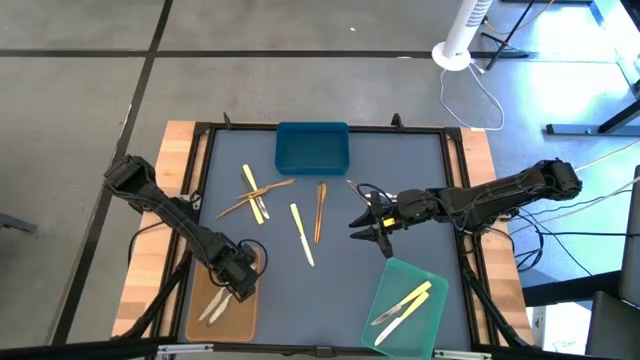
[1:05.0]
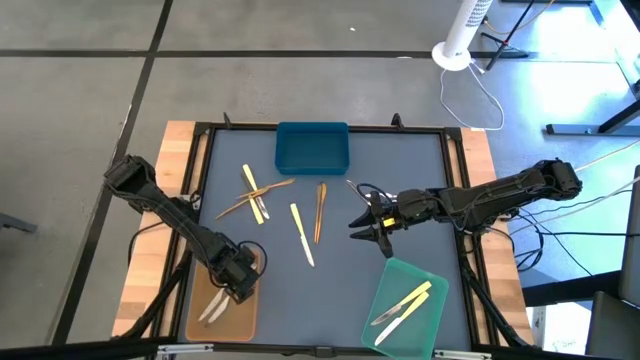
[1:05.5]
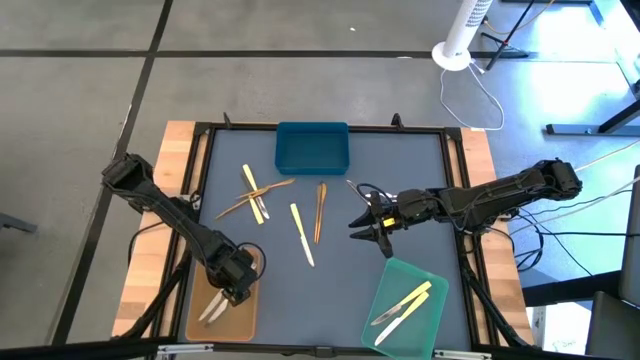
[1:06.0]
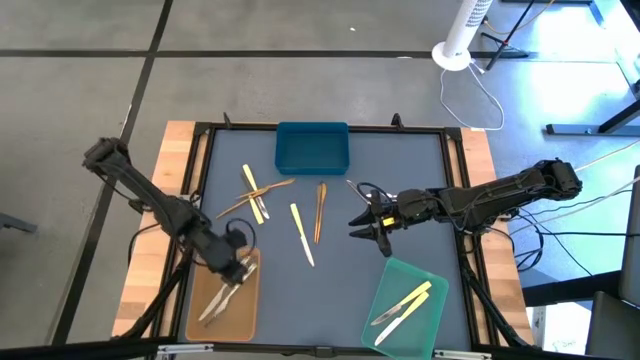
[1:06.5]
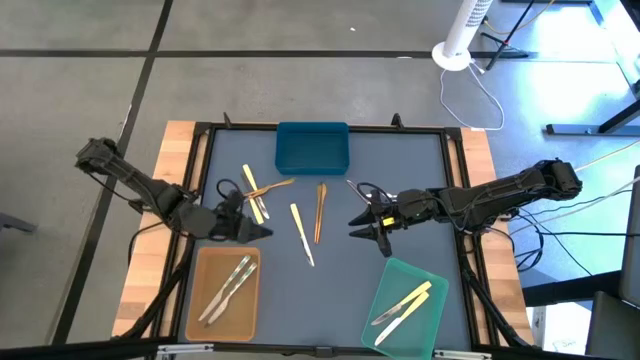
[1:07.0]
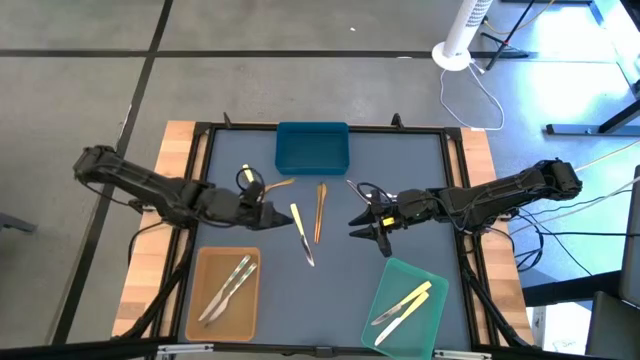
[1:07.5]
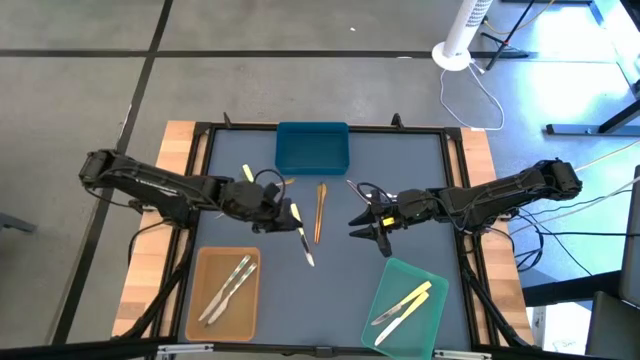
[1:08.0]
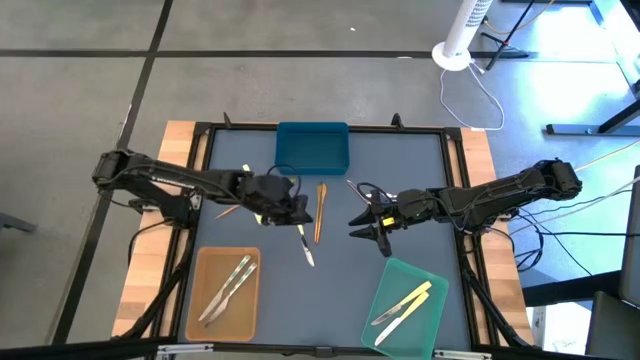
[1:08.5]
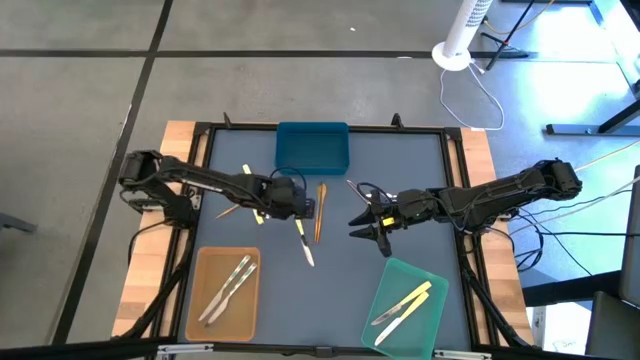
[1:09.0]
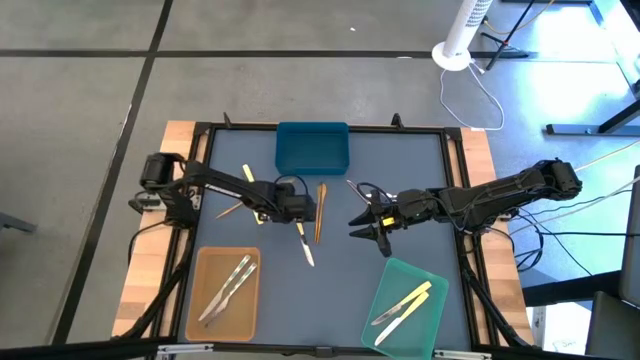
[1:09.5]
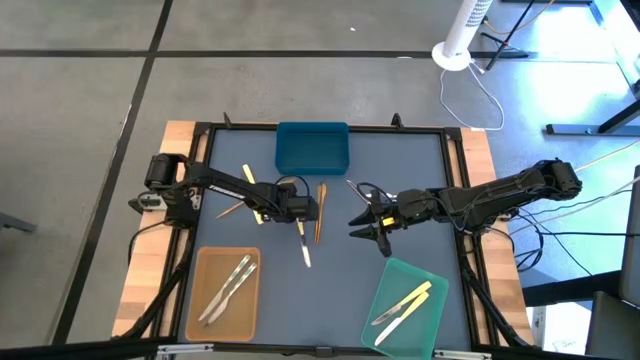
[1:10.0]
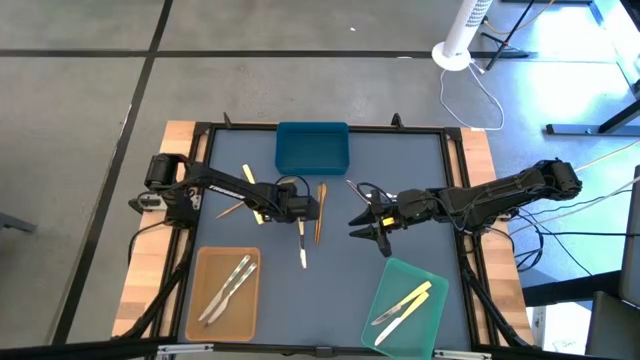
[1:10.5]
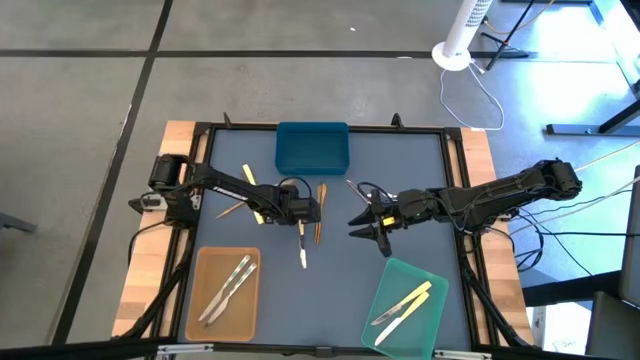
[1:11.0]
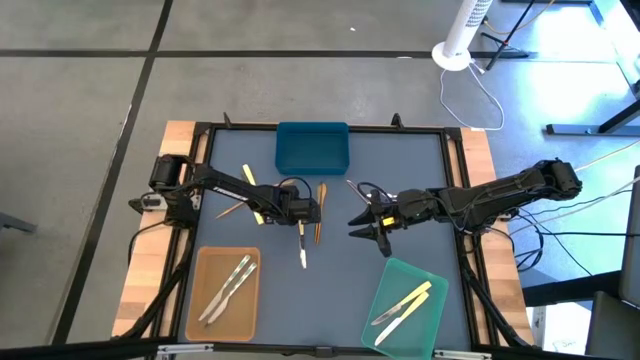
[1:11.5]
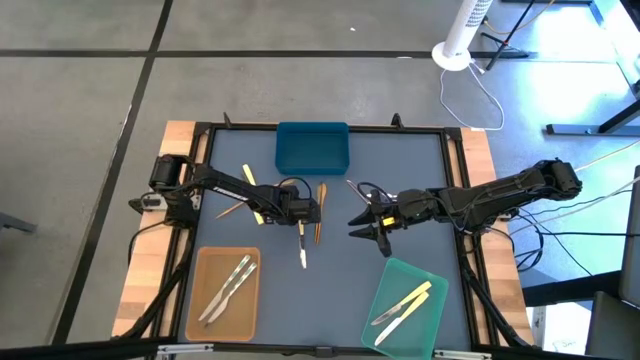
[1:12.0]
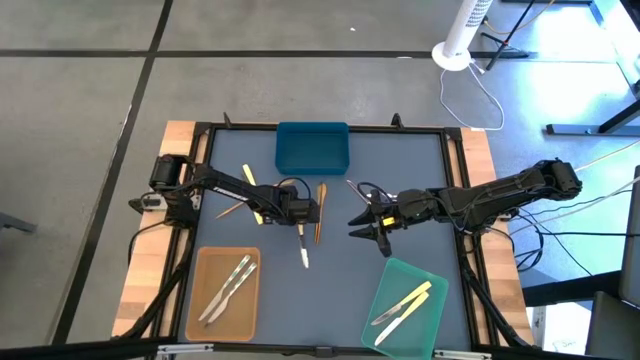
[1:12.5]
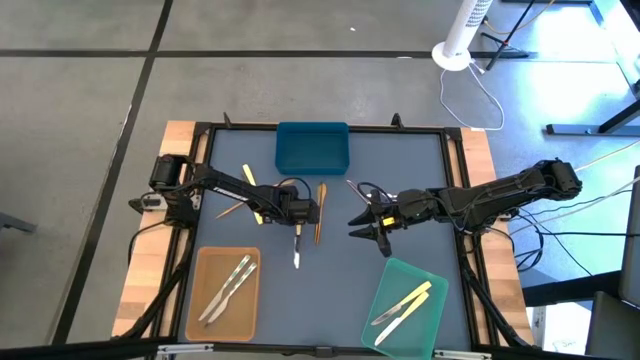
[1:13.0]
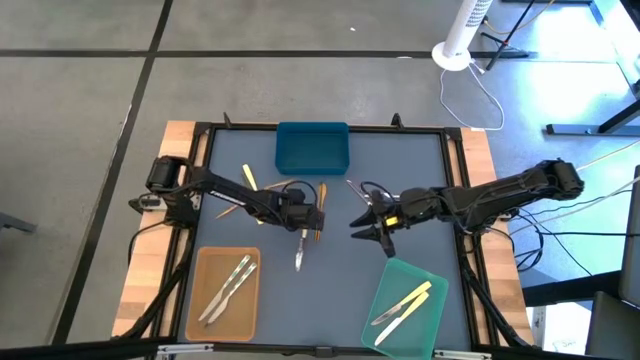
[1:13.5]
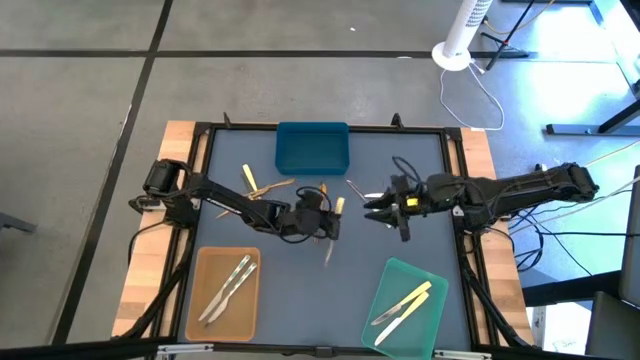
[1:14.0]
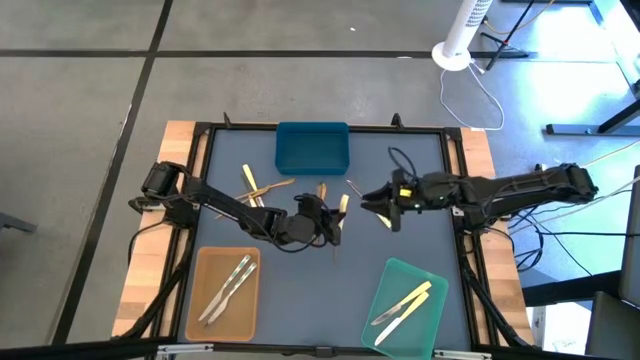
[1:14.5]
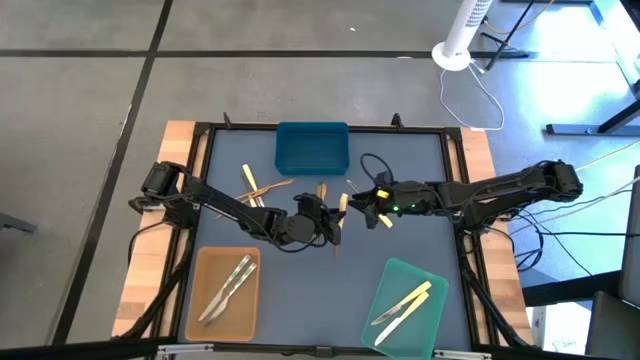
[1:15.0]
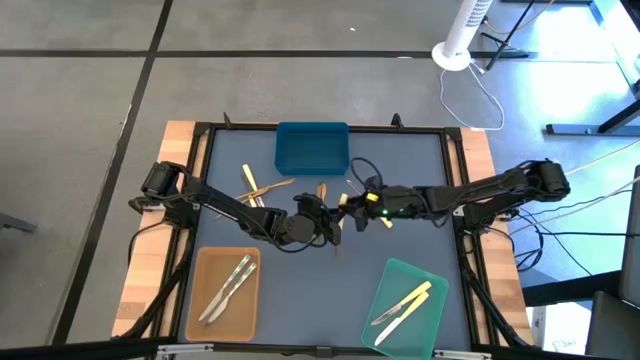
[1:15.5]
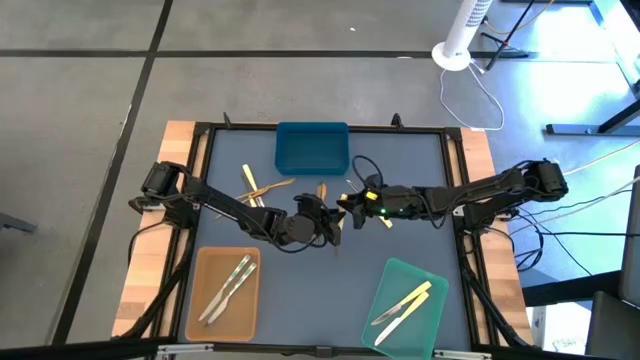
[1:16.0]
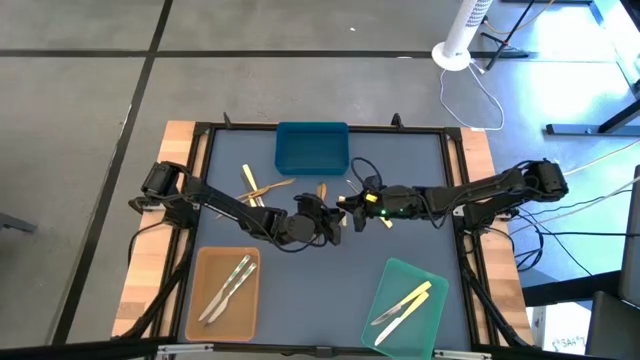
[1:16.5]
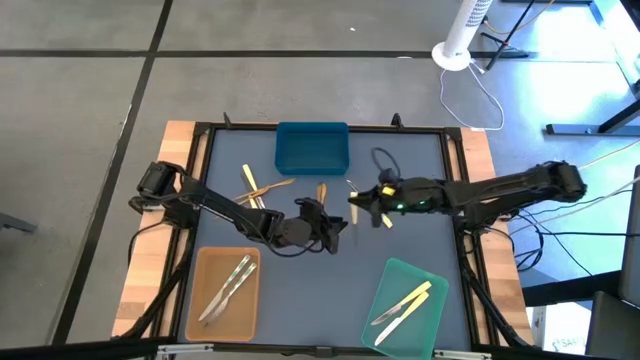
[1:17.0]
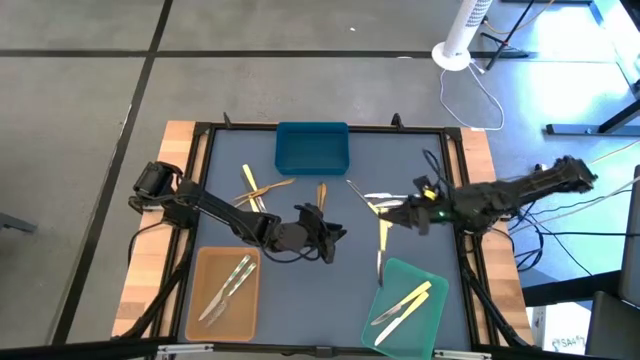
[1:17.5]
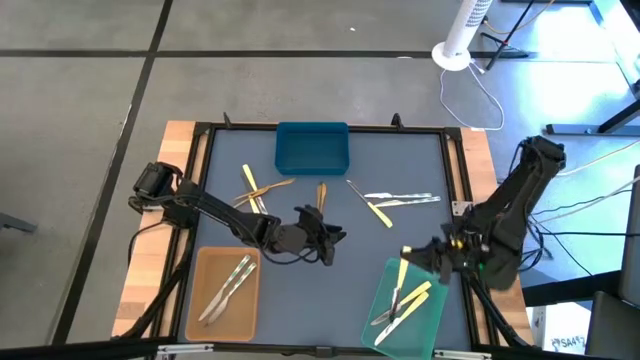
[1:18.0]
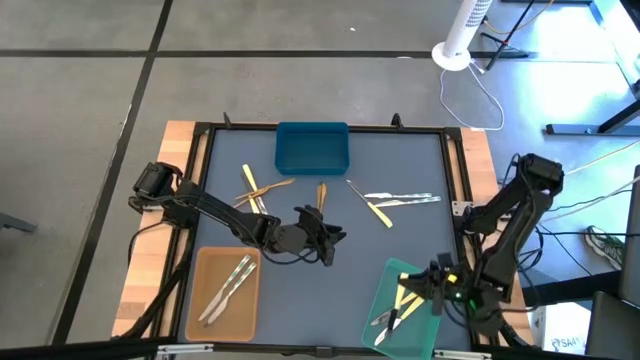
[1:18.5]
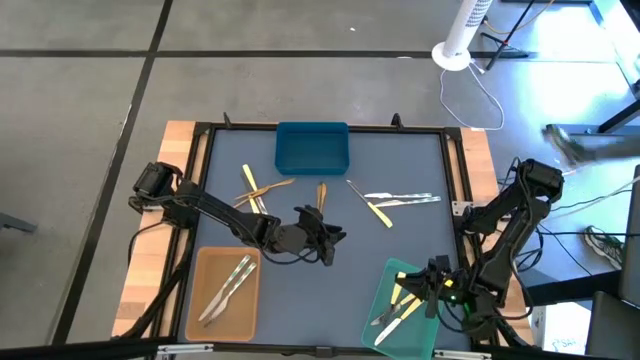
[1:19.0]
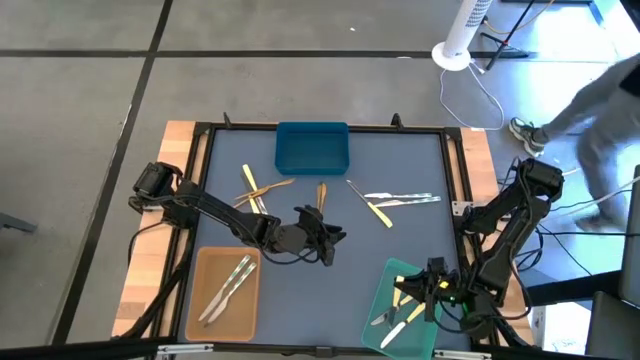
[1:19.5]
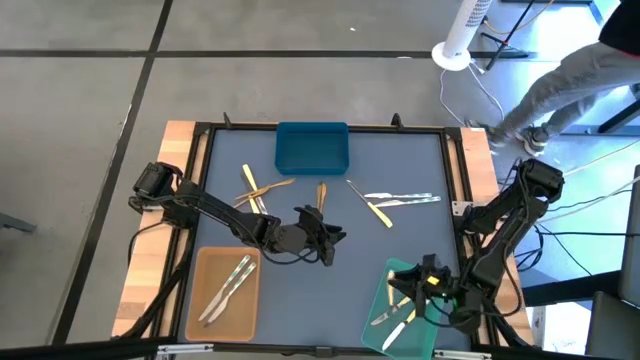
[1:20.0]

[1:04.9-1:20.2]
Task: Sort silverware by color (type)
Put the yellow knife into the green bin

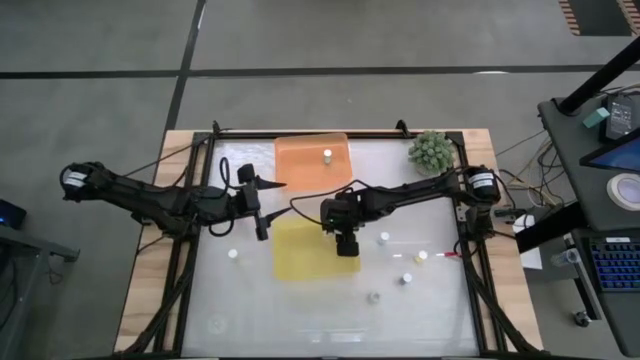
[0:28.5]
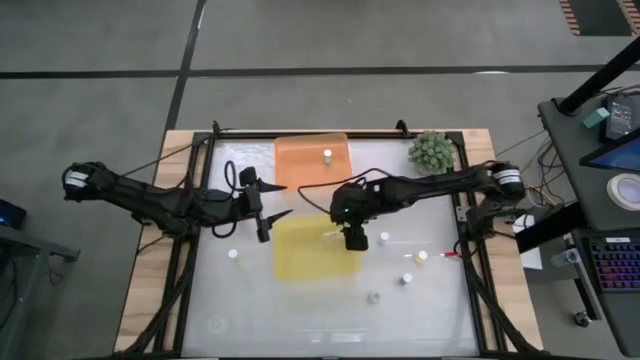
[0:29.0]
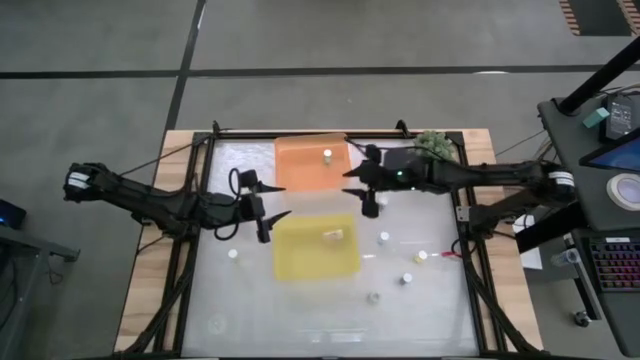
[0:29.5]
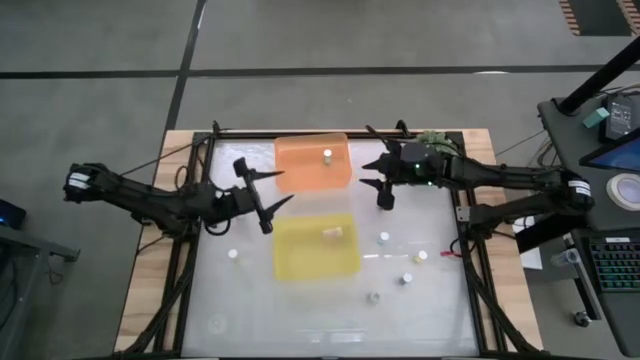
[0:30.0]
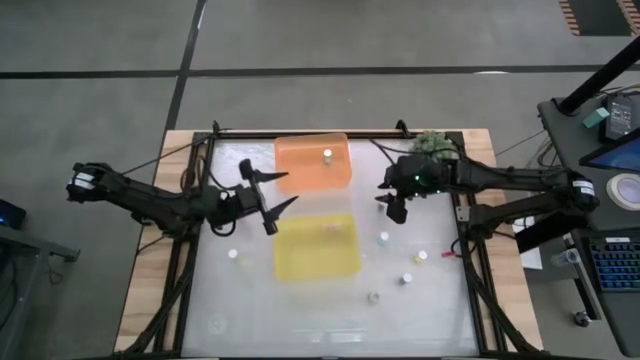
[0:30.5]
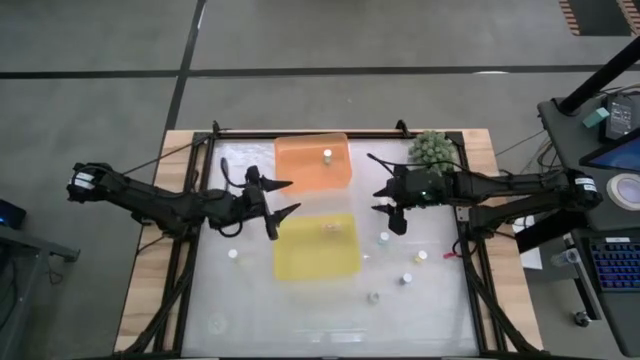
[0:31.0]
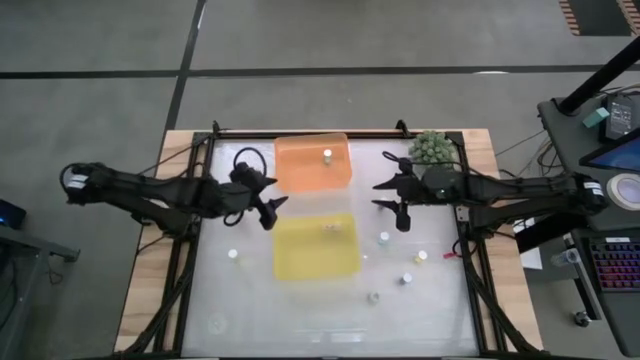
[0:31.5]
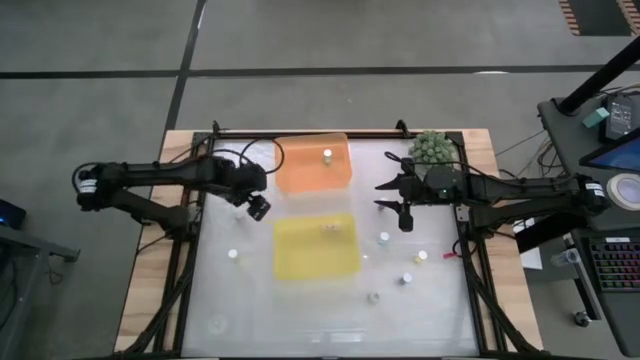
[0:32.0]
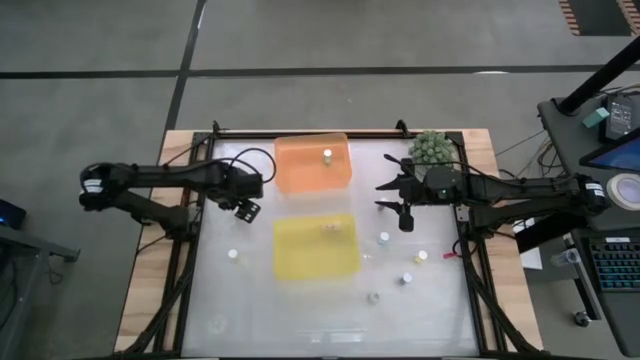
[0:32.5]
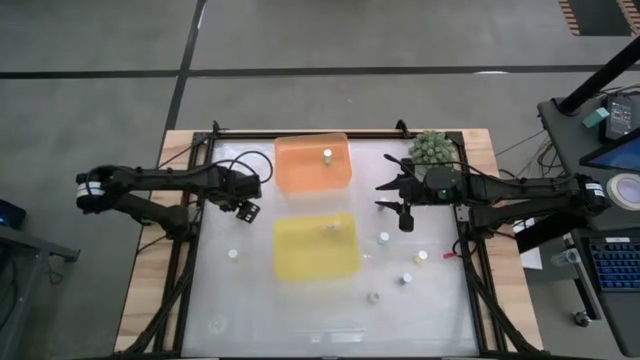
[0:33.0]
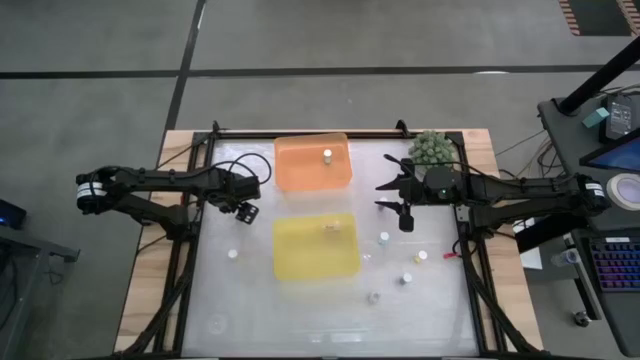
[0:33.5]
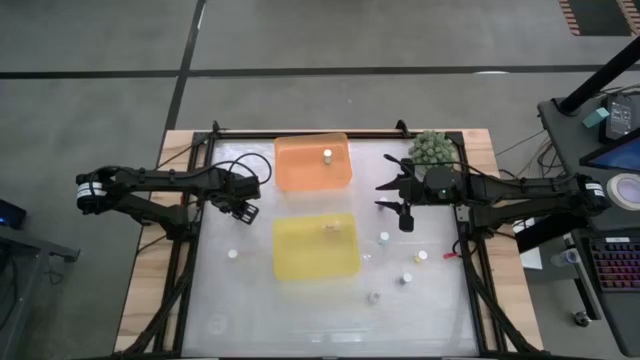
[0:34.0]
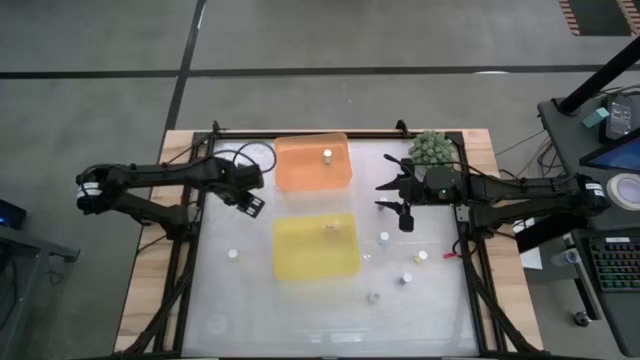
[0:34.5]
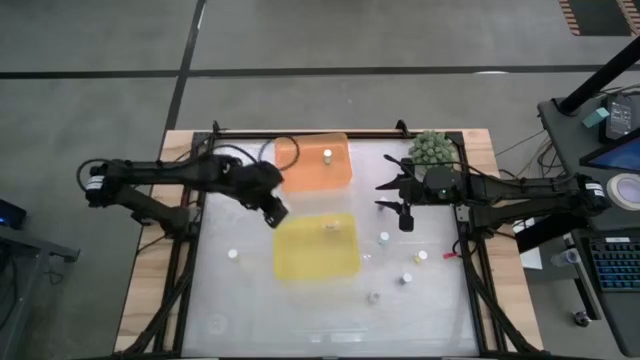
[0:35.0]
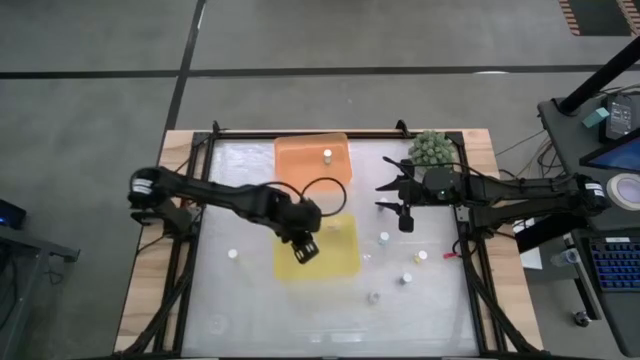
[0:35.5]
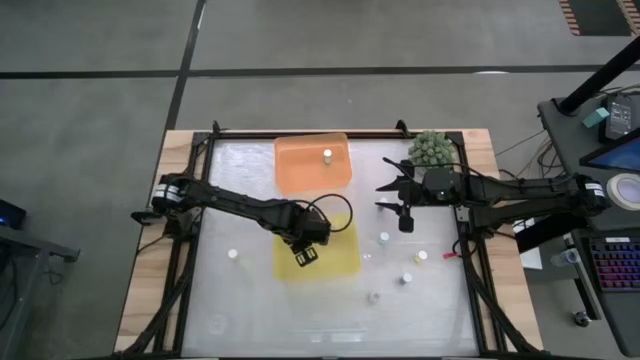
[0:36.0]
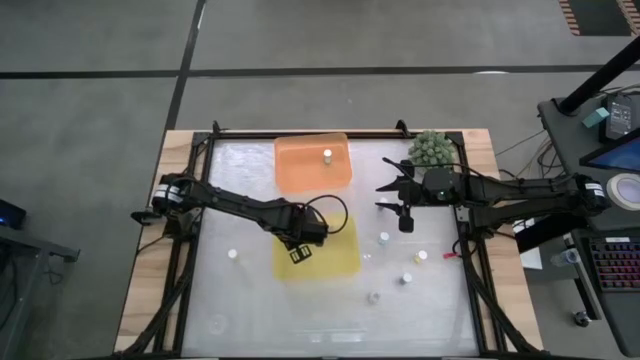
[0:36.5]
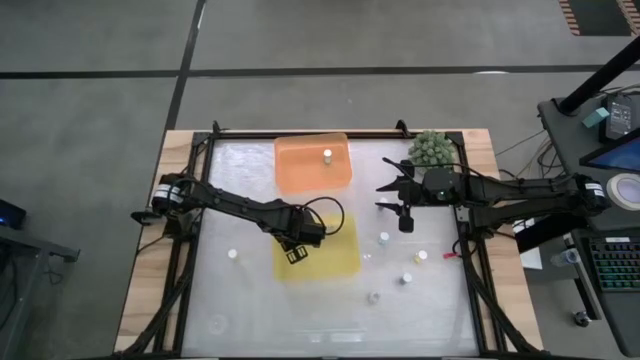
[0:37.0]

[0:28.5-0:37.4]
Task: Pick and place medicine bottles into bin by pill shape (circle, oval)
Put the top transparent capsule bottle into the yellow bin
